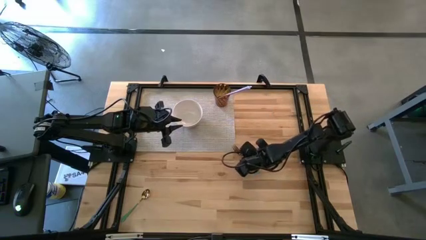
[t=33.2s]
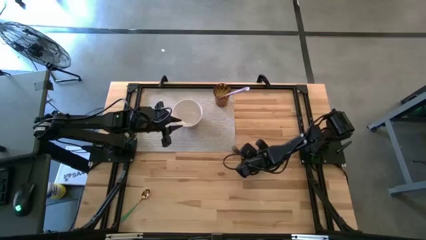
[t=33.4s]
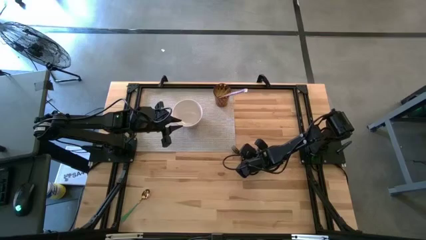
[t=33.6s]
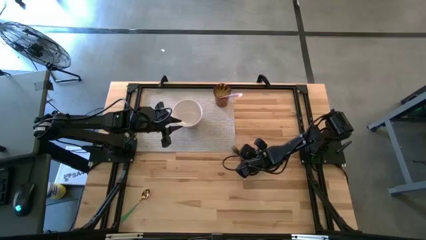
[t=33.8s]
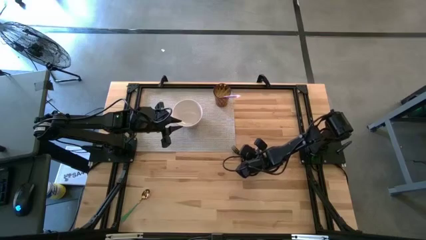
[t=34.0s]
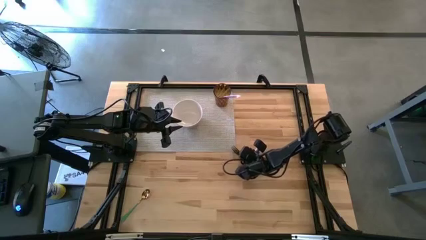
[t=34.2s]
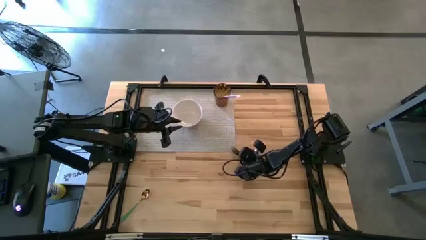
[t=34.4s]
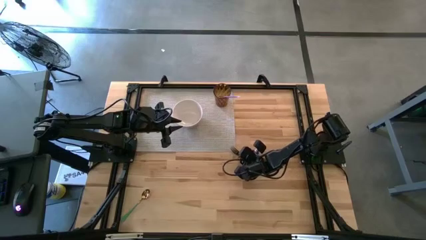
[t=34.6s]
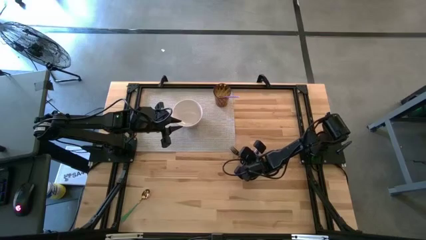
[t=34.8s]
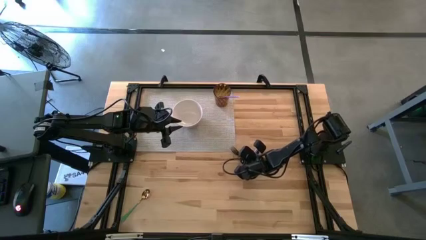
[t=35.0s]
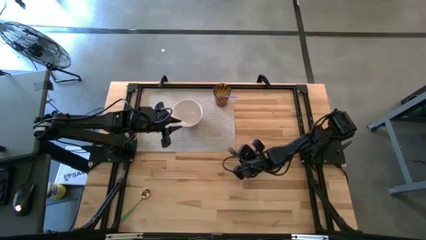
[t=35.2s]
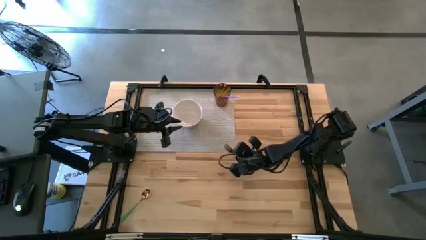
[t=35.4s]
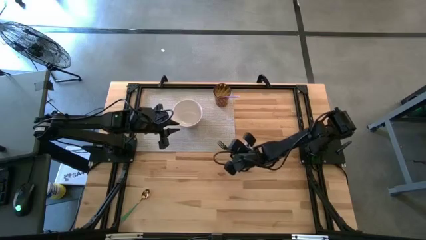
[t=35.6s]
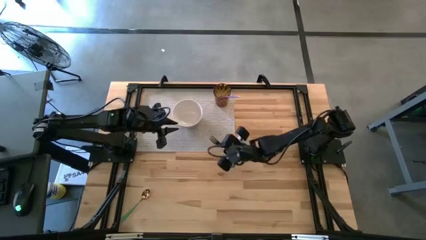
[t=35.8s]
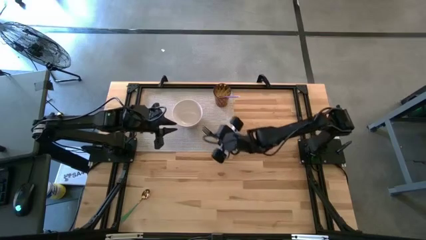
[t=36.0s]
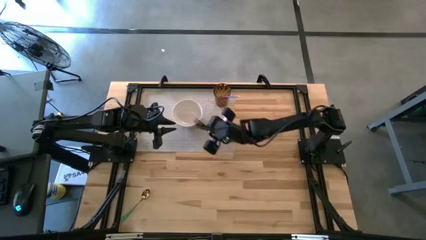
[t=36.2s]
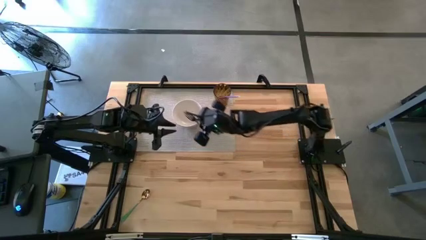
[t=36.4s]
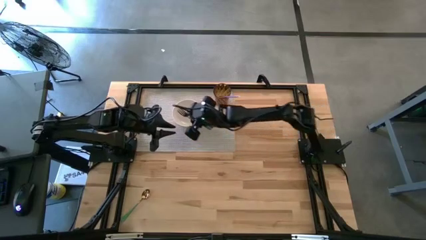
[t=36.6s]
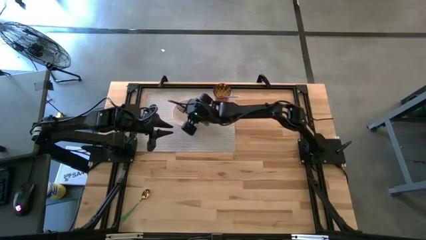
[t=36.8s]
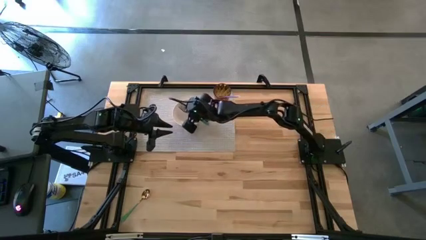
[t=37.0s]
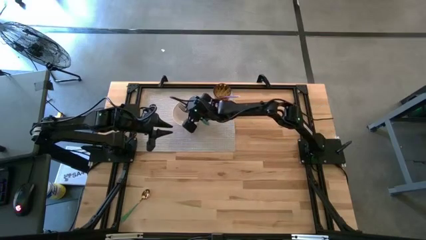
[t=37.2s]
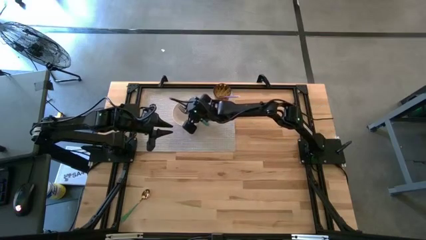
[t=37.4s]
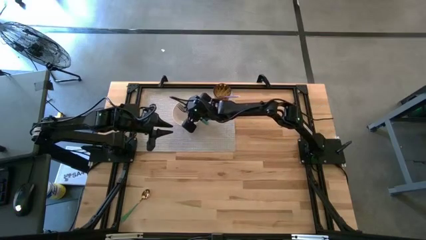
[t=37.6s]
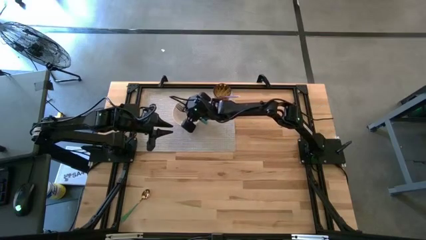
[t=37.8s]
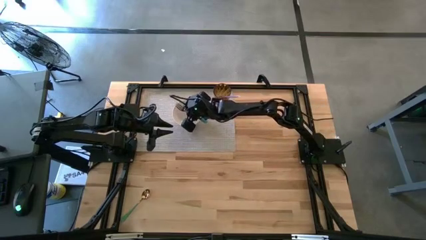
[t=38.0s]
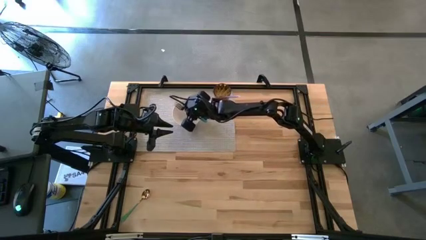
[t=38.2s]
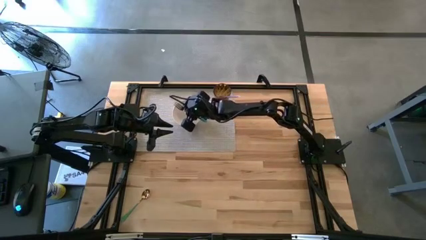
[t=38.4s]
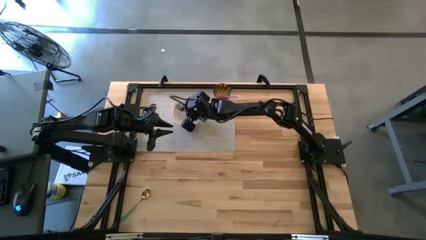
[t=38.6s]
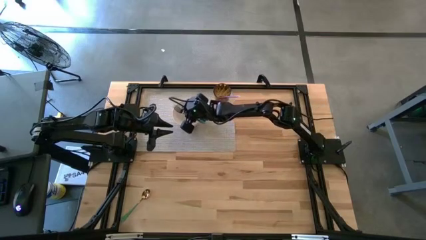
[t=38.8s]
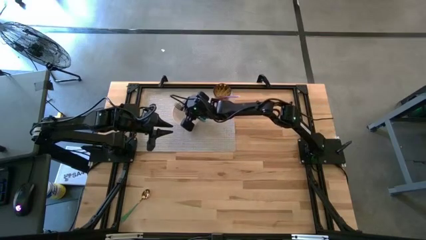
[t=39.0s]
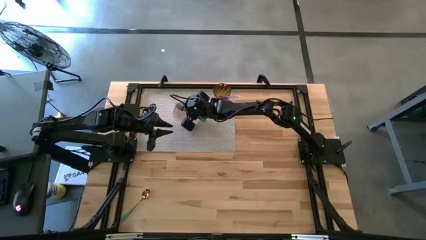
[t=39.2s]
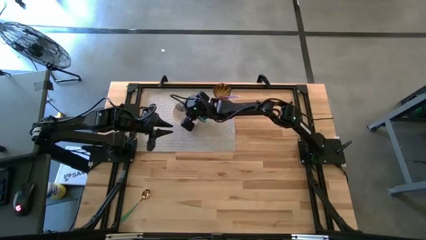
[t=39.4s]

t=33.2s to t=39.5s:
Task: Pick & Place Utensil
Put the blue fork into the white bowl

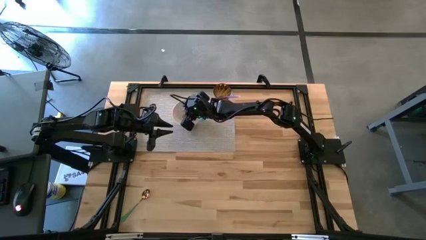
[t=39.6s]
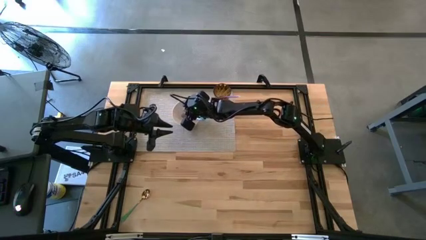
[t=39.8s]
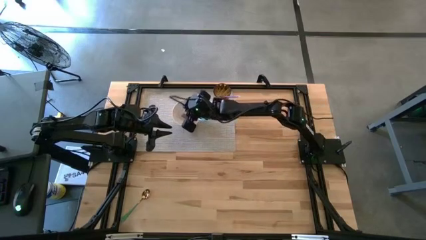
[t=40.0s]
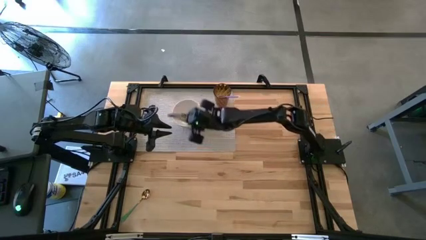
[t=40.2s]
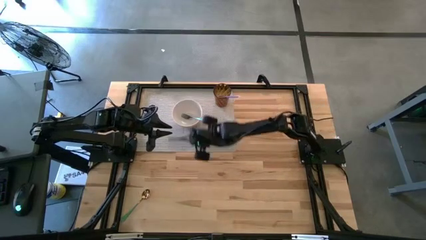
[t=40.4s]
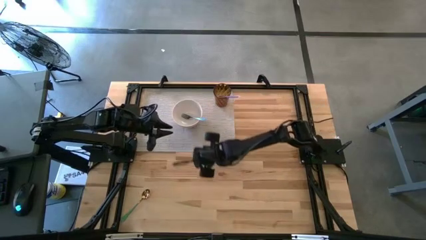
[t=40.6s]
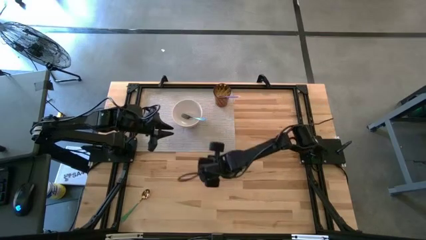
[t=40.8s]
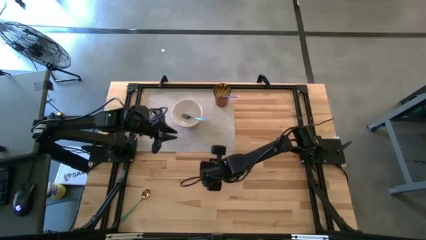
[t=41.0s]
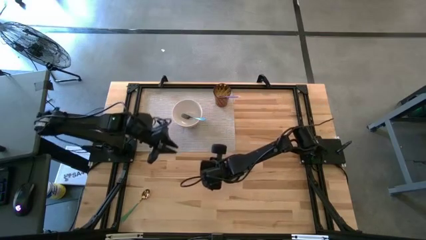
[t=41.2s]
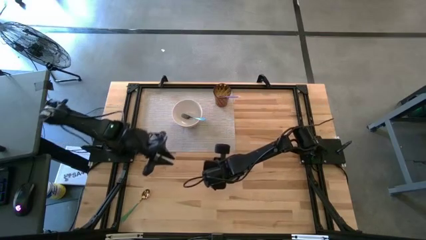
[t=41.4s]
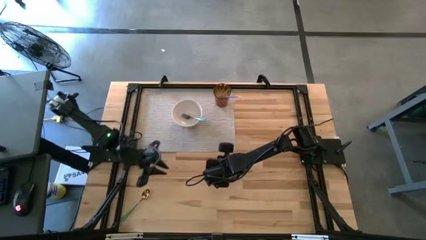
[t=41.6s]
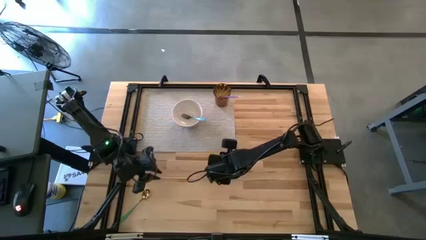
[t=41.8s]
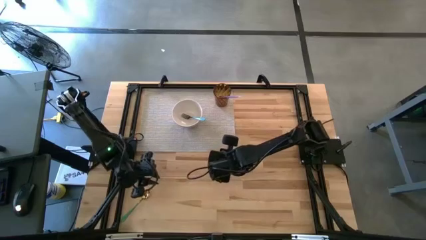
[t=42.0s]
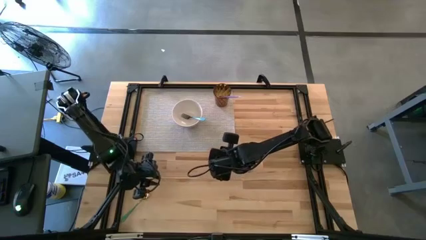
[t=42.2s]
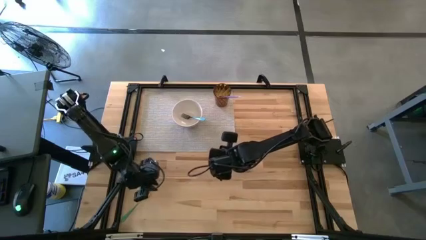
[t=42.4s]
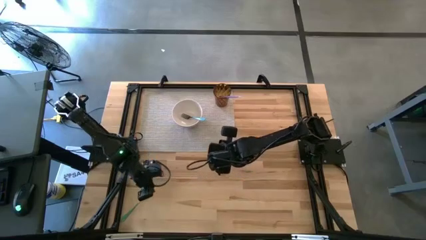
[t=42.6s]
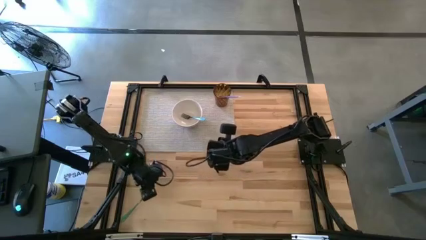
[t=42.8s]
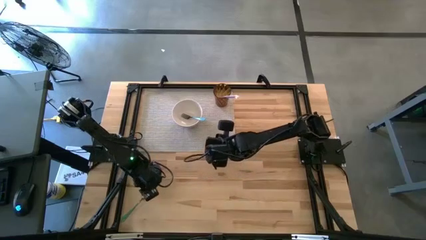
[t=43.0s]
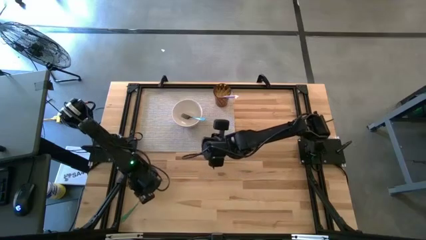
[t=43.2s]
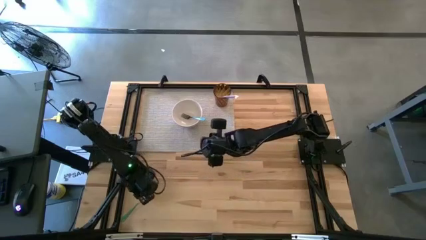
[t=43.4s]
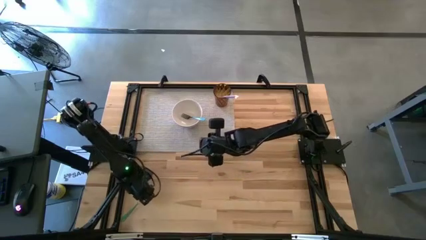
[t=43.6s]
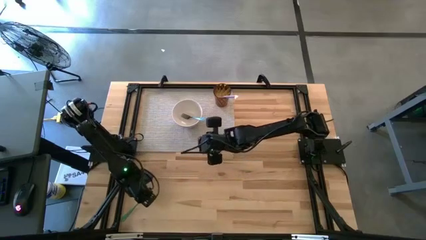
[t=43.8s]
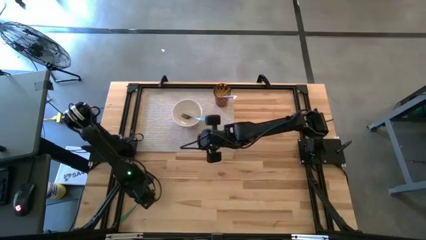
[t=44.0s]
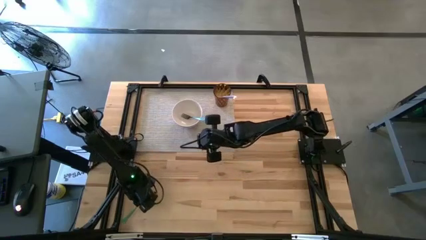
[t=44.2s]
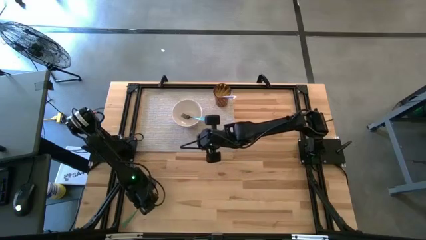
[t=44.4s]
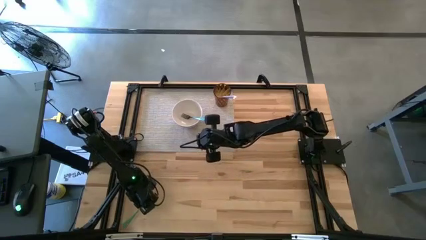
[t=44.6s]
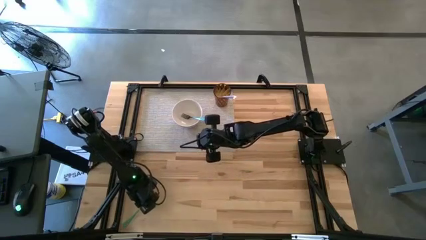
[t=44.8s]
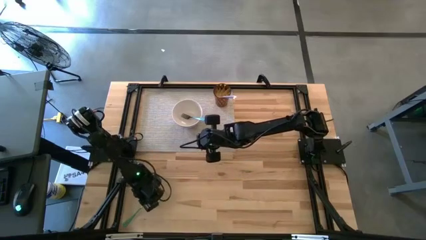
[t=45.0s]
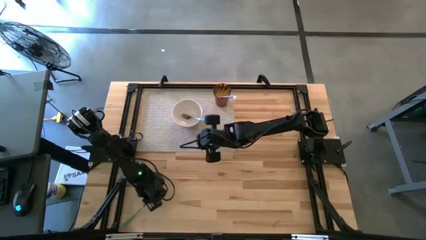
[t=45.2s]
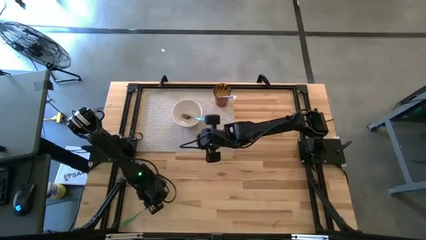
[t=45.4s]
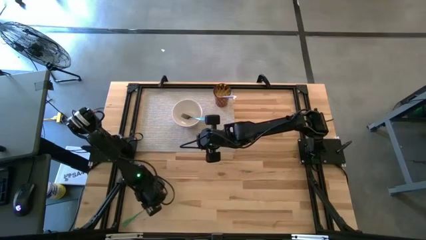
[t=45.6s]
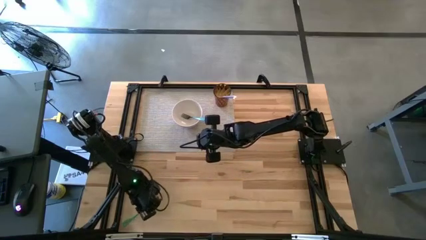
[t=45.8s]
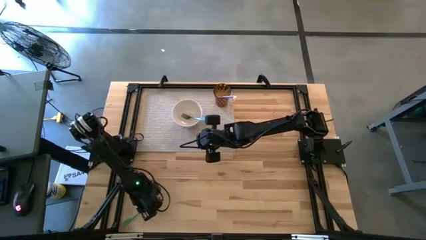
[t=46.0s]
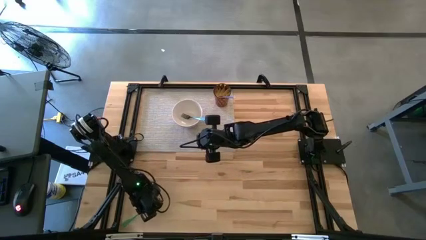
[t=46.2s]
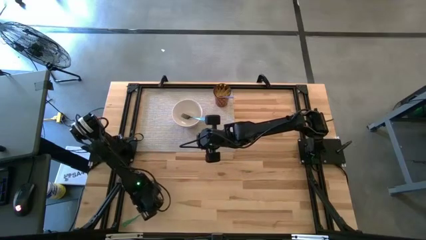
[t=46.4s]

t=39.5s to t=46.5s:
Put the green spoon into the white bowl

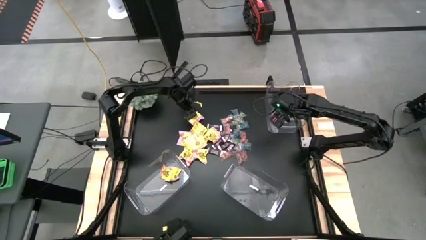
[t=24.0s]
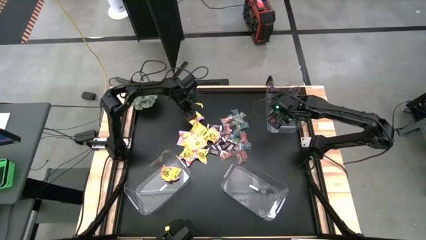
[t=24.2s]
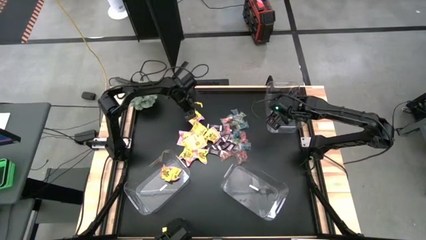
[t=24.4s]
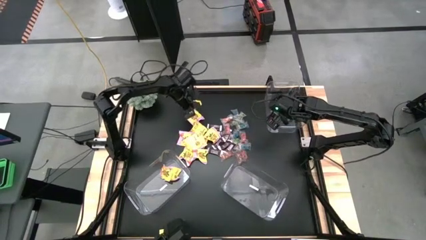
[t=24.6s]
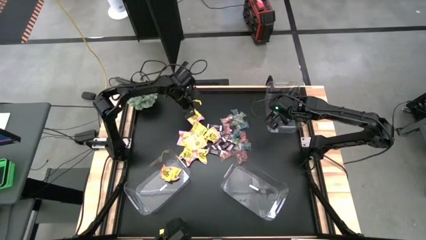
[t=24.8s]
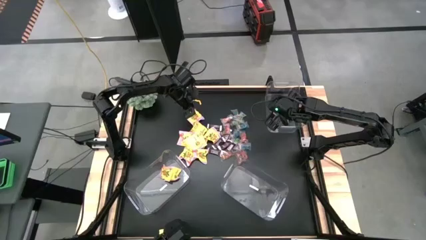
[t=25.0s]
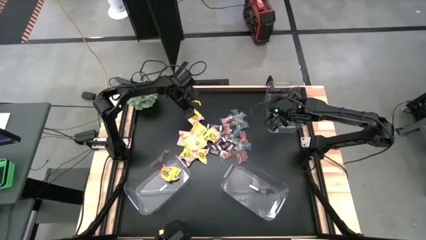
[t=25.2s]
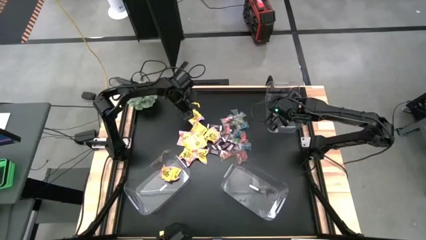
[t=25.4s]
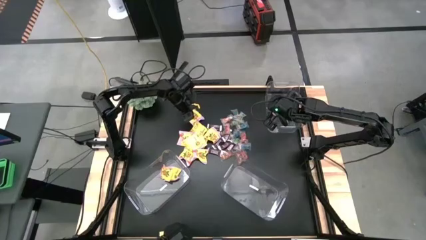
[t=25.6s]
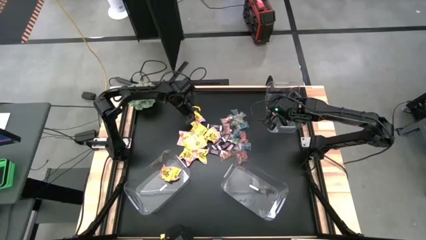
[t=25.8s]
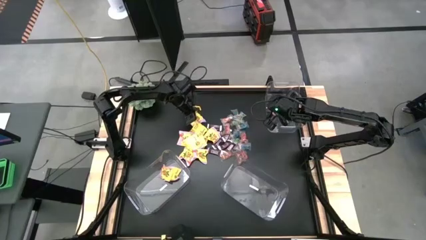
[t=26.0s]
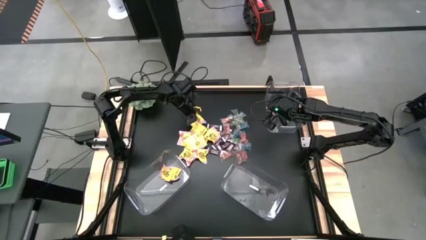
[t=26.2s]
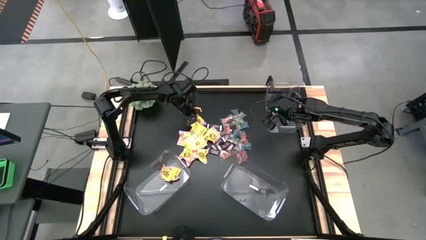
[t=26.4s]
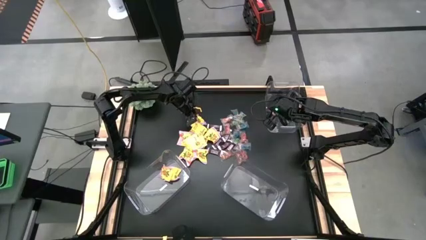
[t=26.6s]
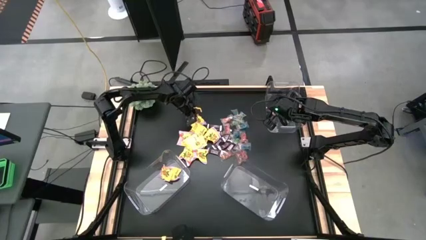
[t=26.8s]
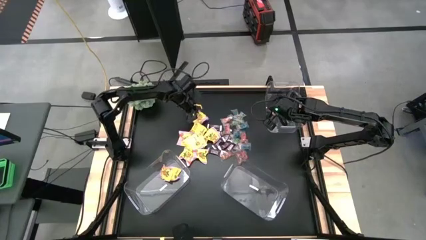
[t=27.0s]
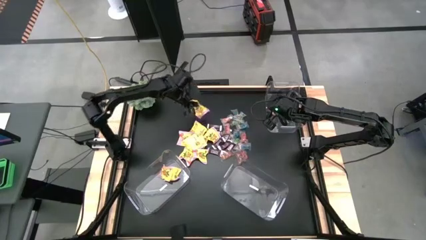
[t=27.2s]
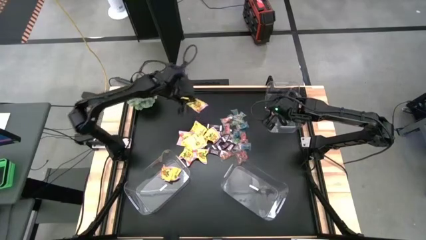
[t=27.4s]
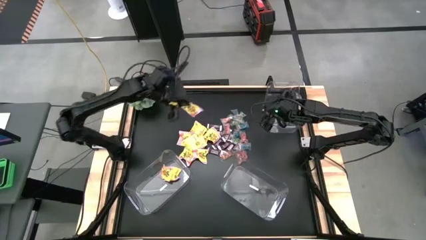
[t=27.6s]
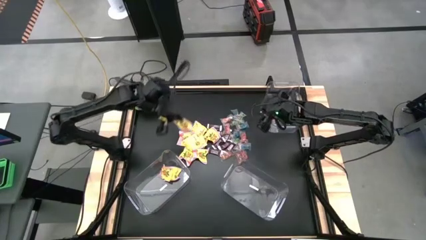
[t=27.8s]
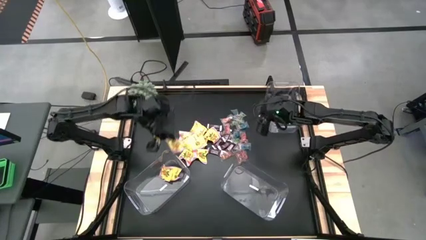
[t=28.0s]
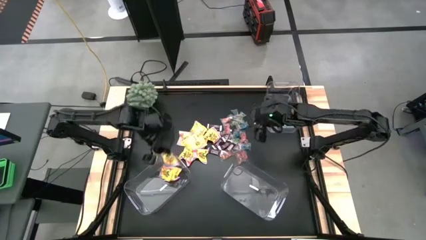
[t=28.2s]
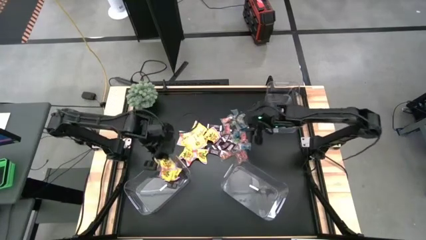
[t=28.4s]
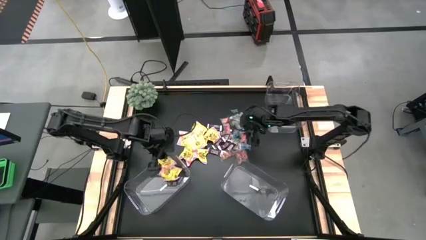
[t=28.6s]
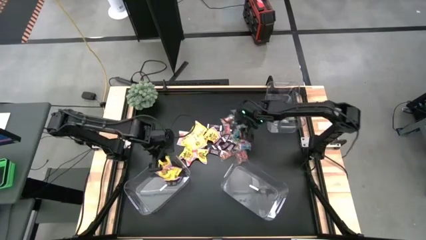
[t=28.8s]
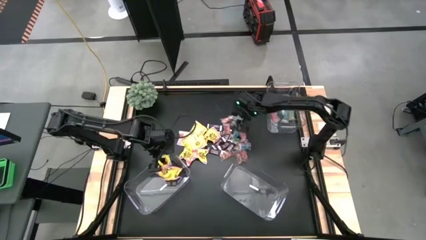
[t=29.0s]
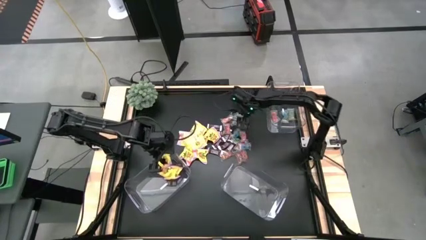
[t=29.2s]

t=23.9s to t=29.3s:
Task: Sort candy
Put the yellow candy in the bottom left transparent container
